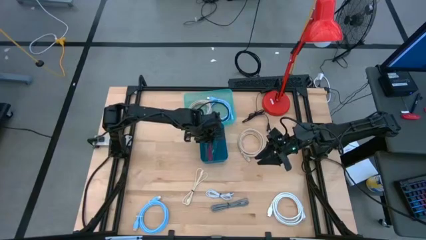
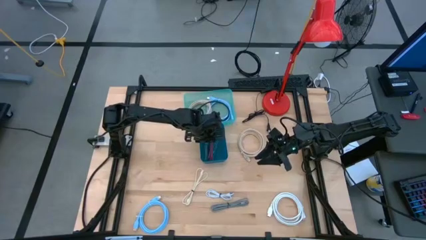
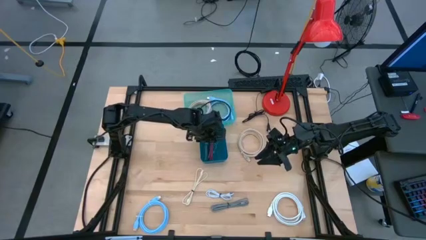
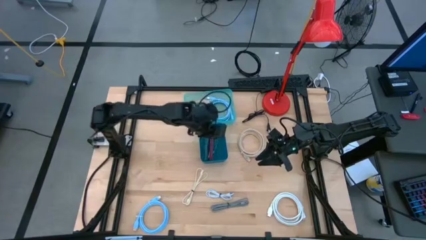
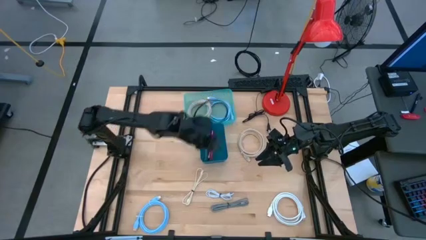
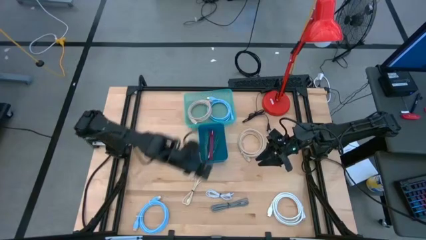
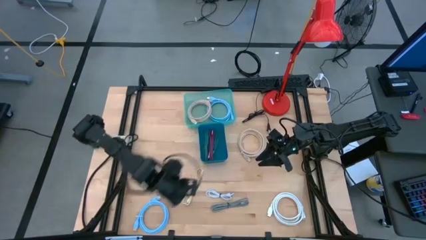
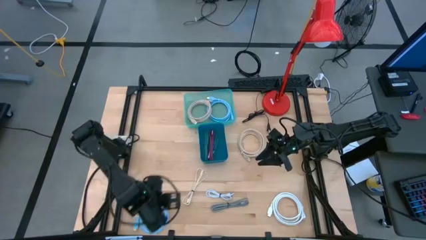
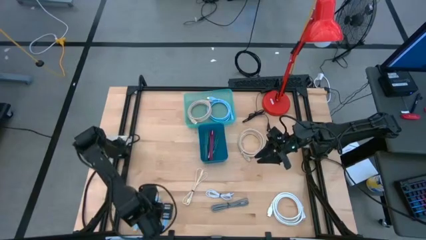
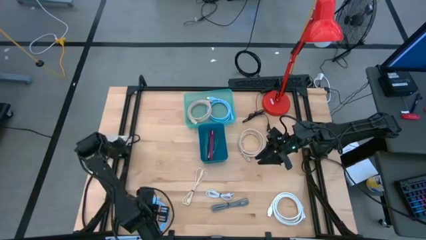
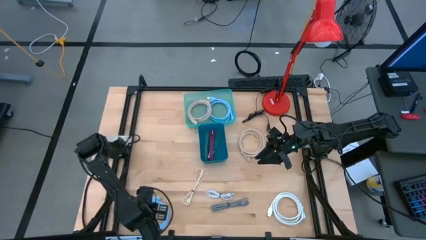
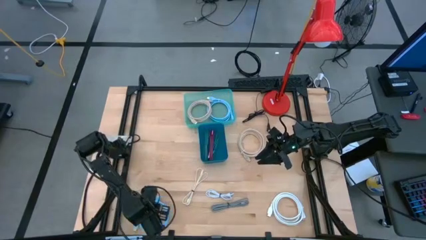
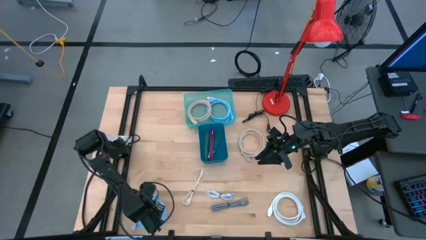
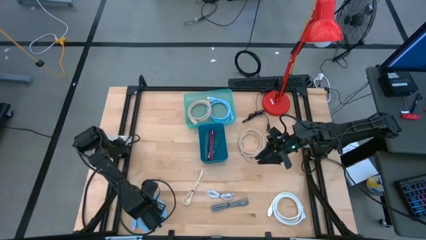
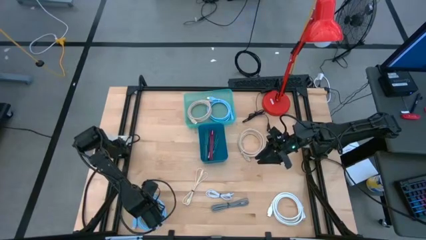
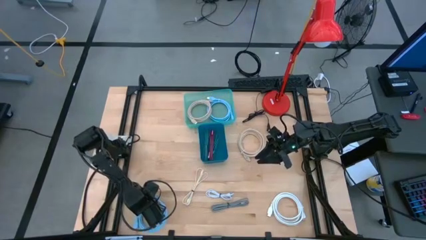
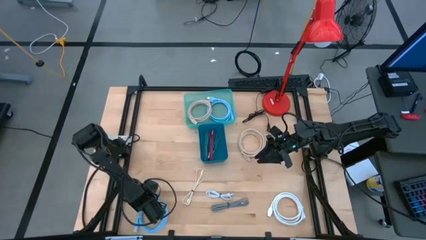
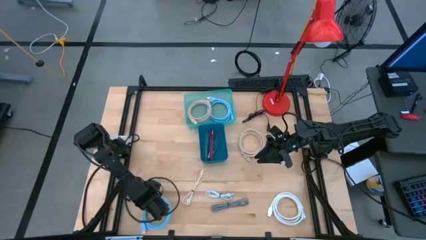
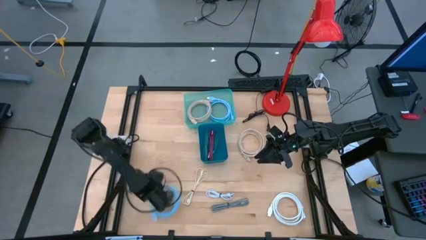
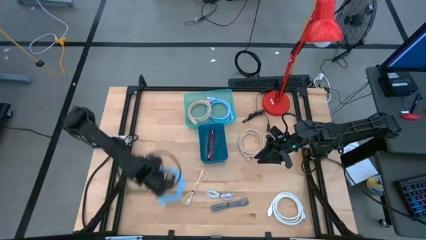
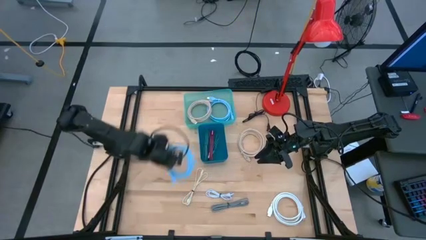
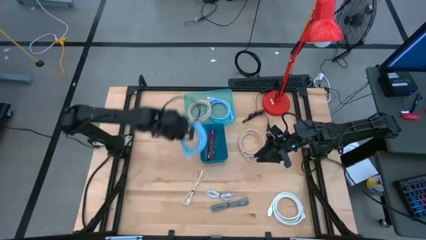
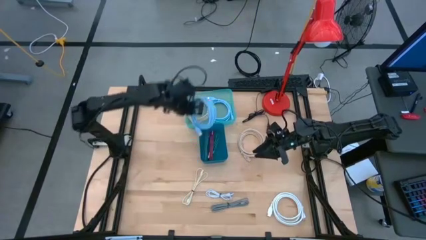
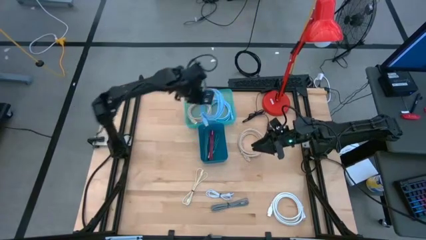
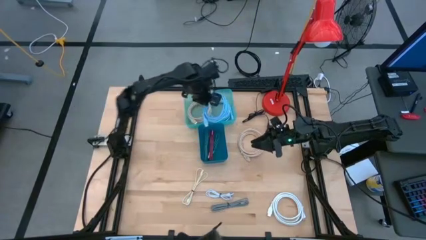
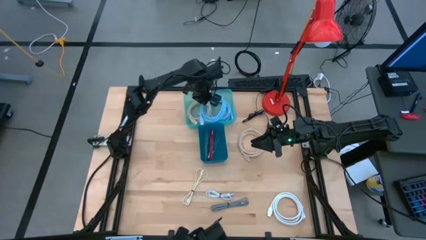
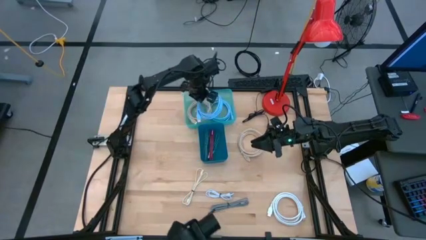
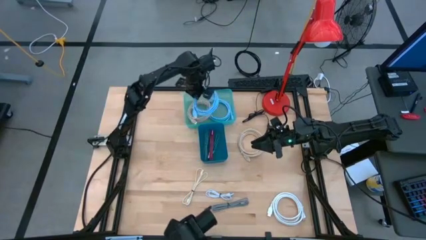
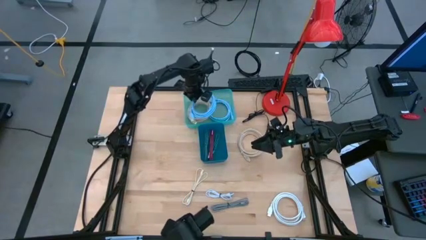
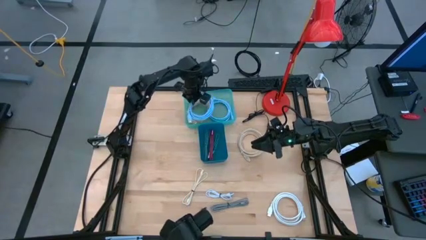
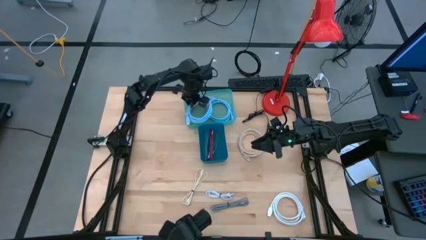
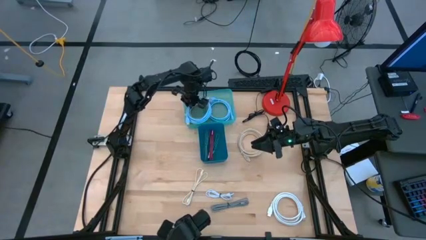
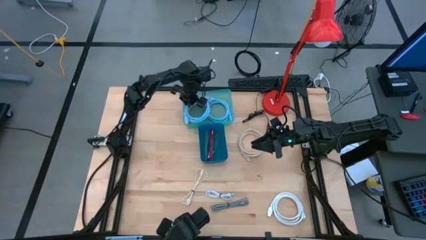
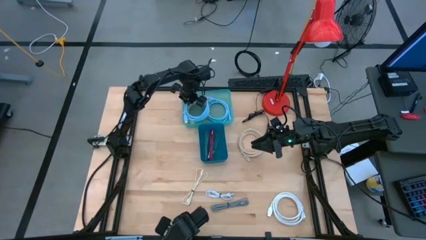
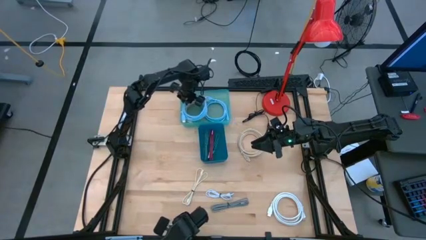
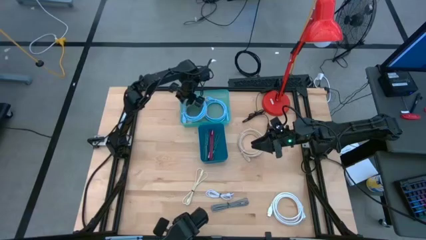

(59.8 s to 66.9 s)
Task: Pick & Place USB Port
Put the blue hdmi cable into the green bin

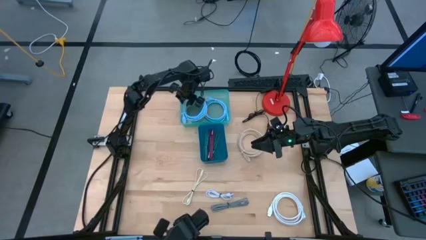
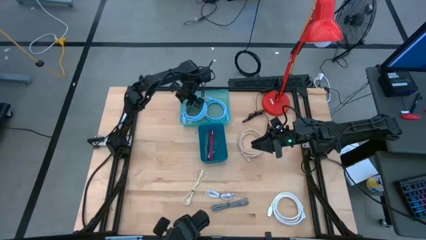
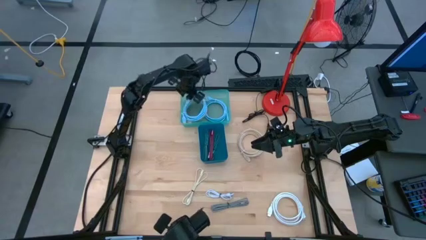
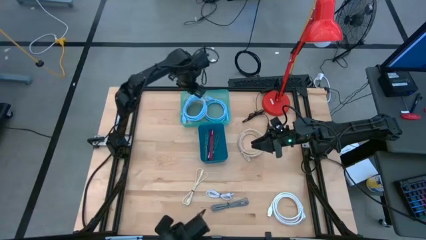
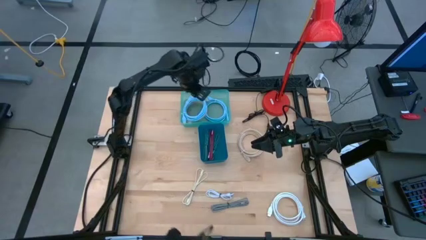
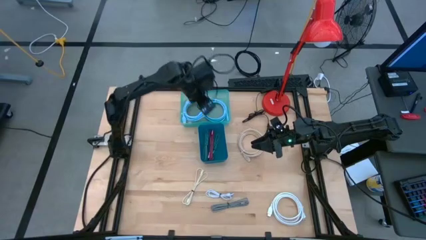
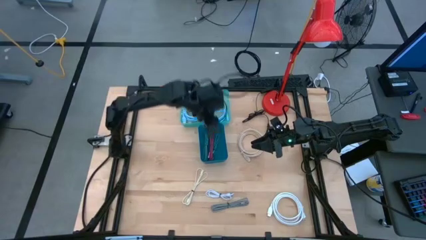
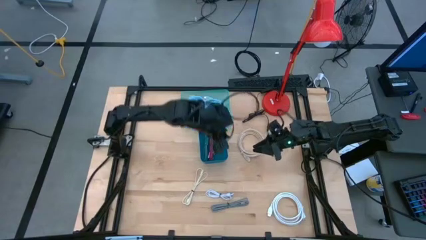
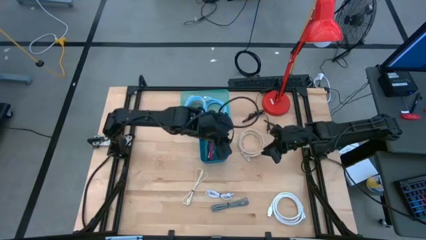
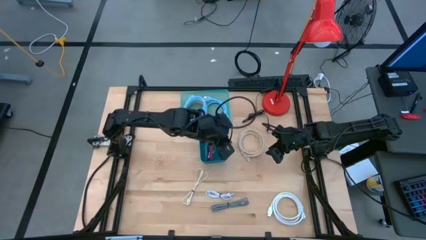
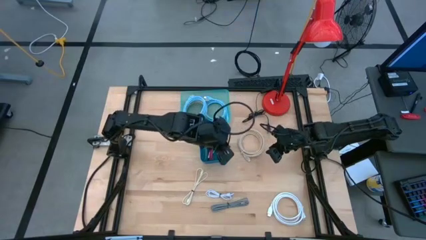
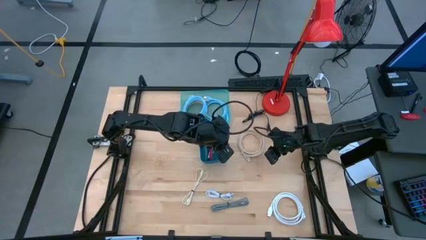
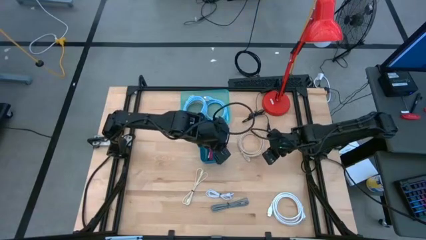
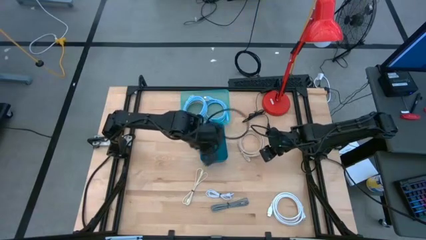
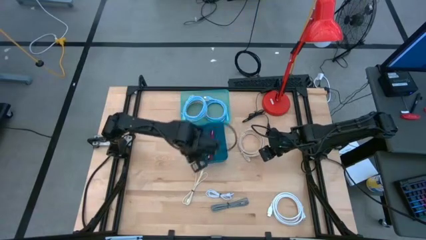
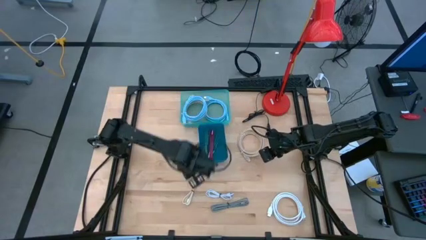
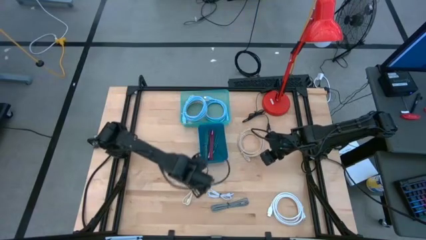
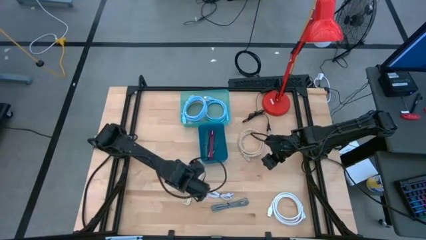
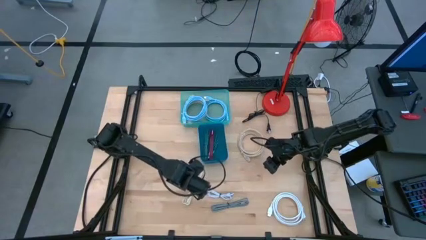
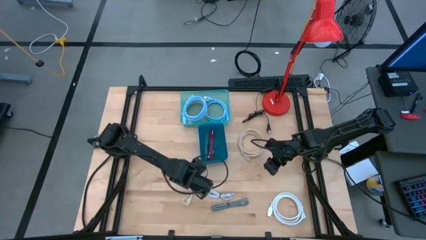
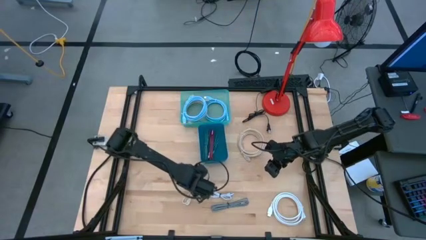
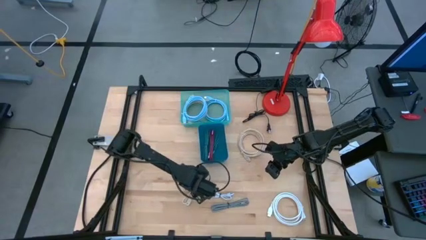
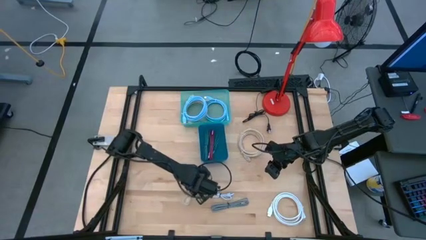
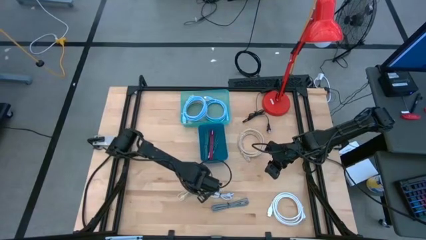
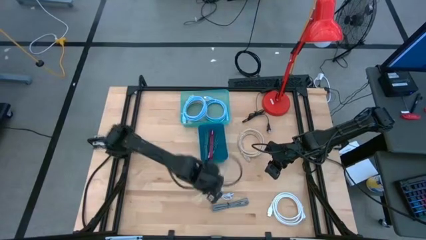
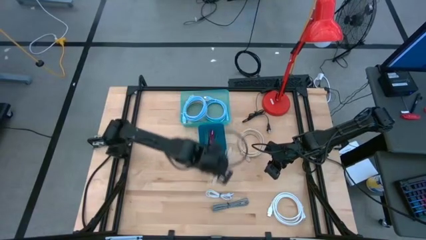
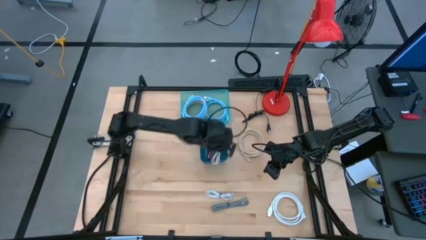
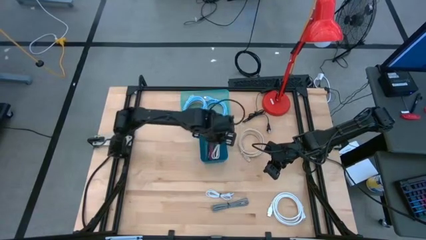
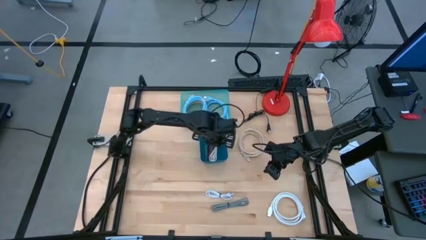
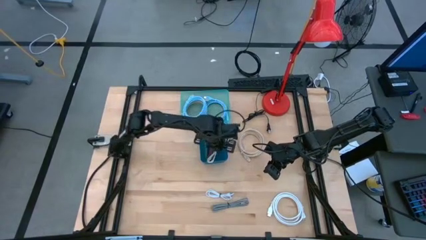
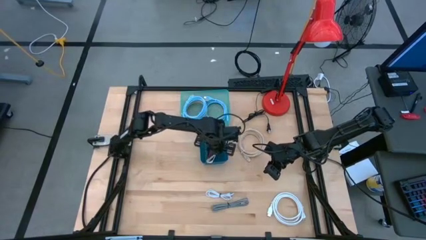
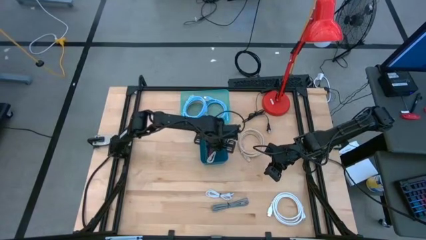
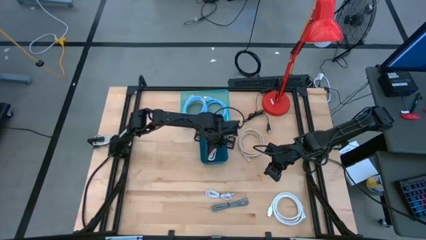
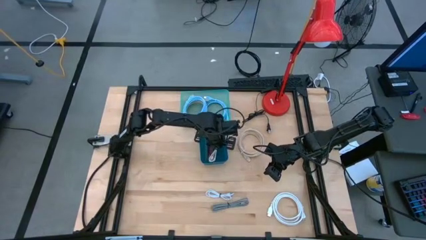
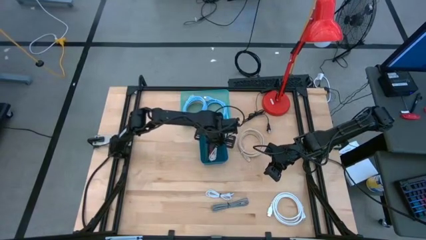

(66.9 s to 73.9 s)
Put the brown usb cable into the blue bin

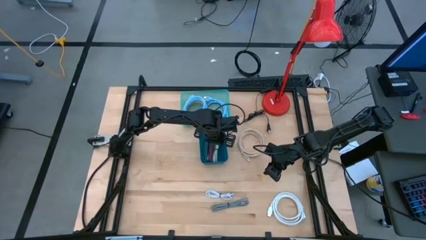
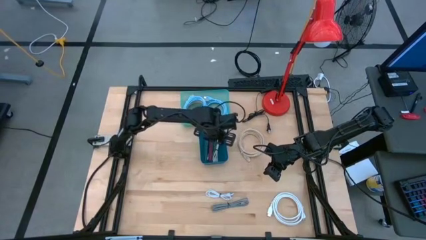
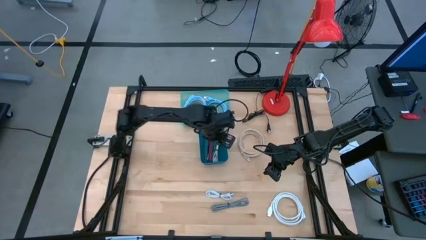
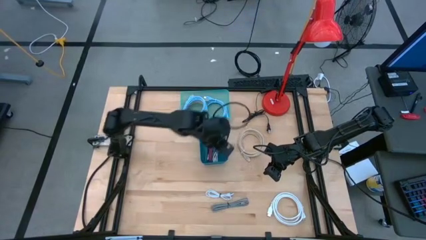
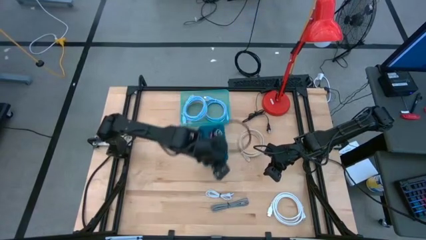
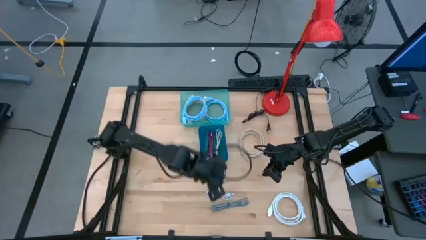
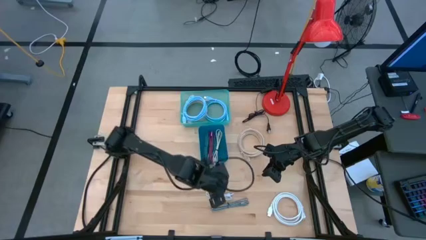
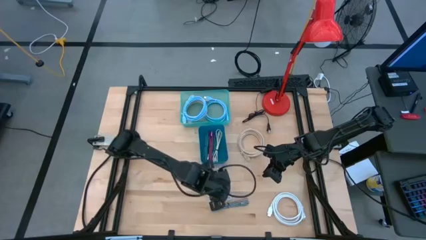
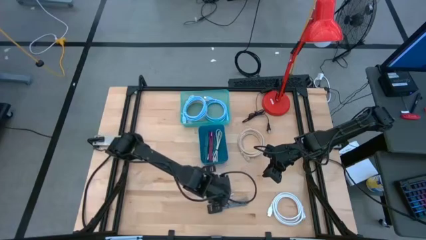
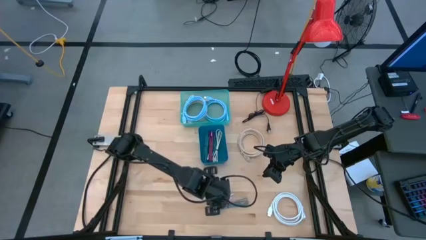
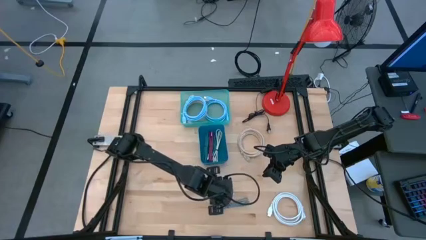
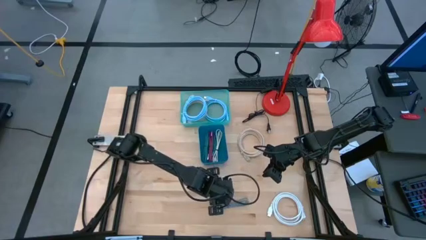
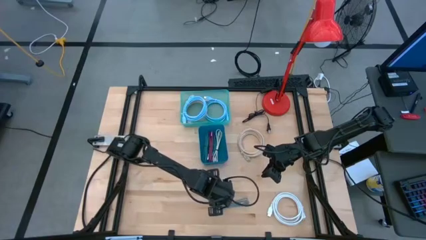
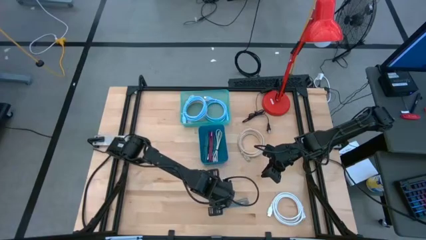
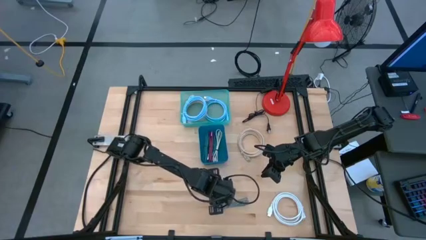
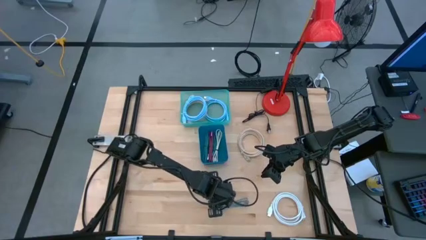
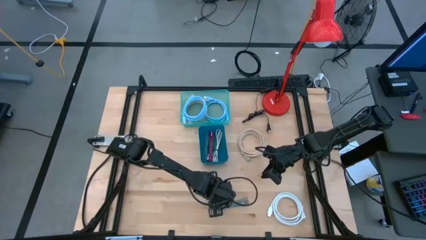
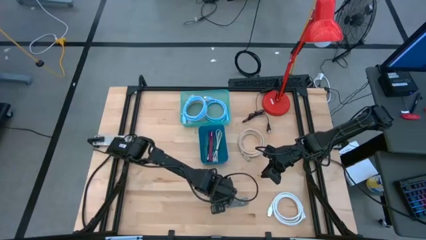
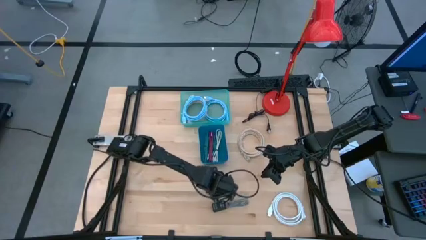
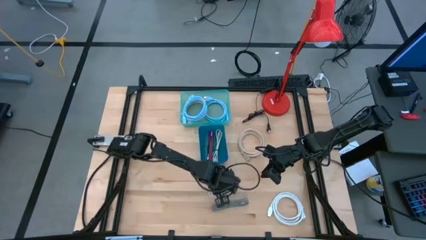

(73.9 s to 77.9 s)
Put the white usb cable into the blue bin
